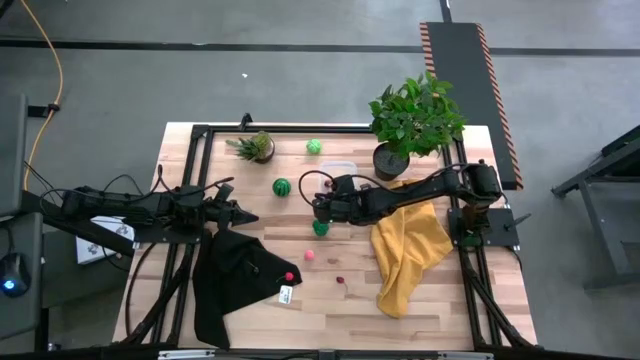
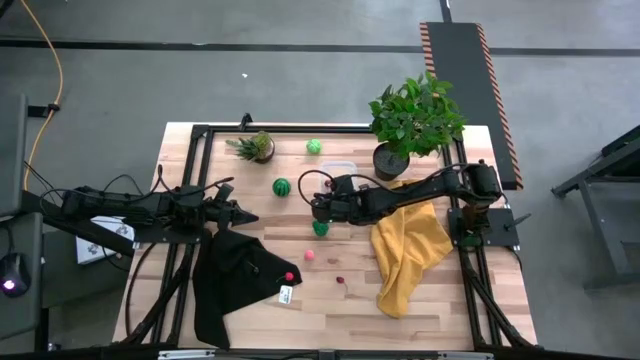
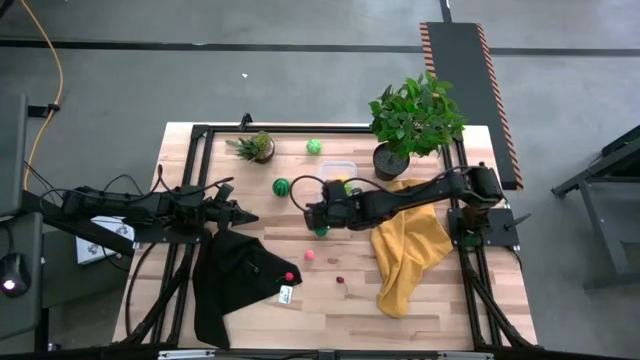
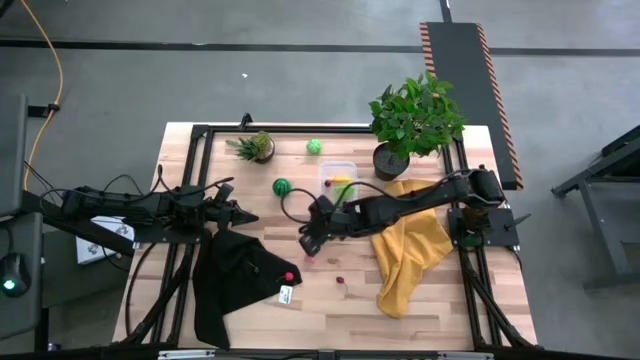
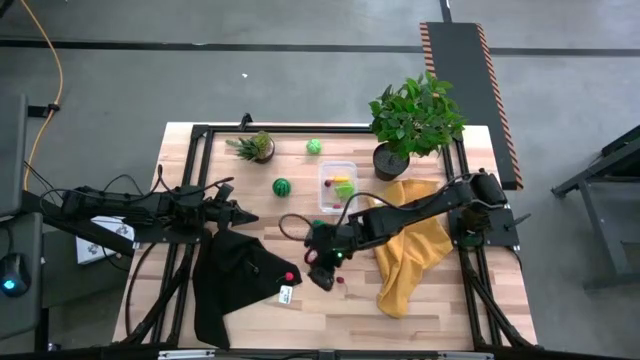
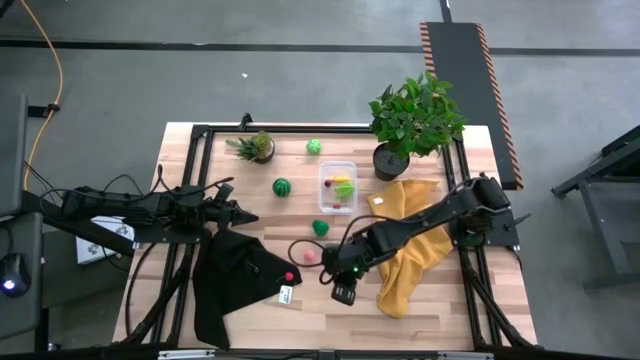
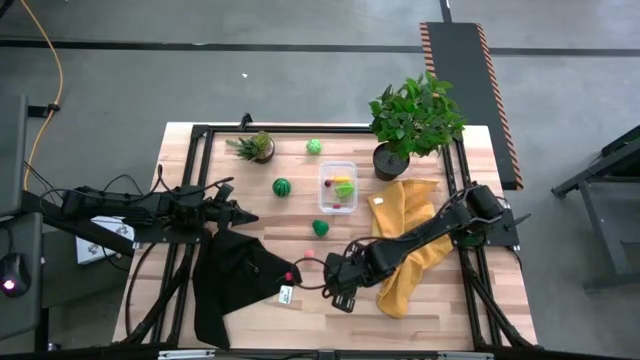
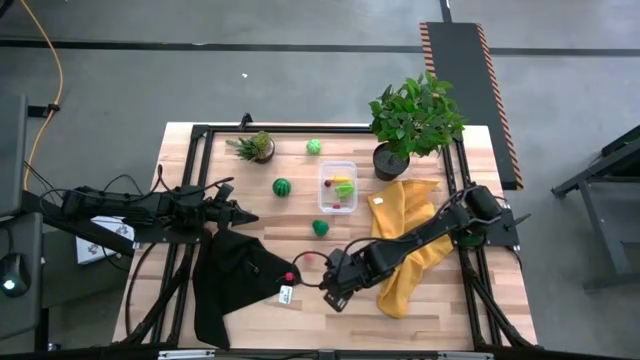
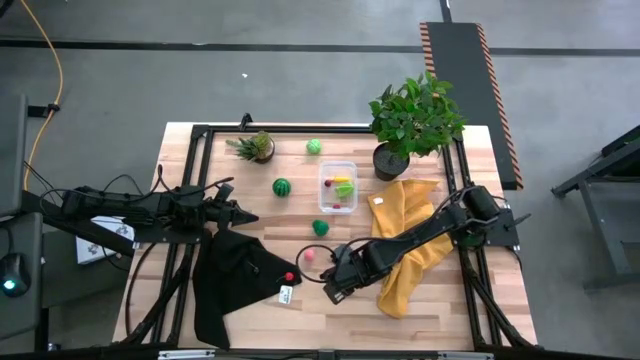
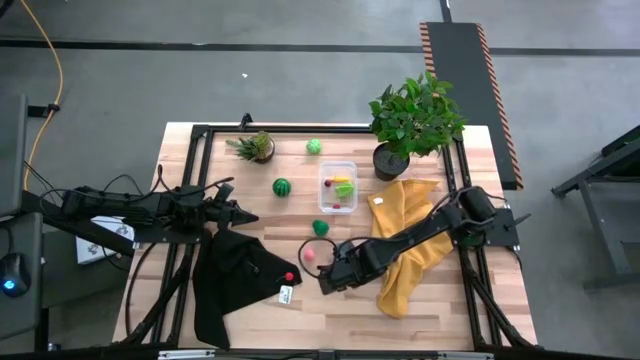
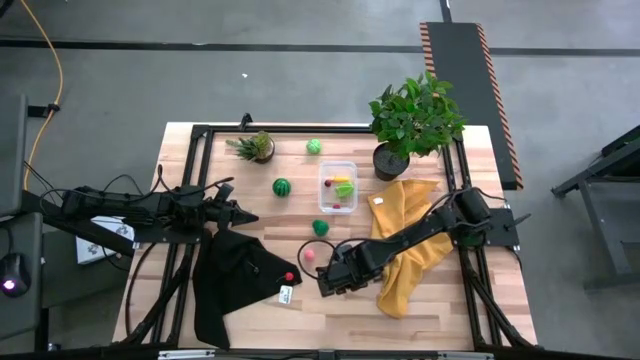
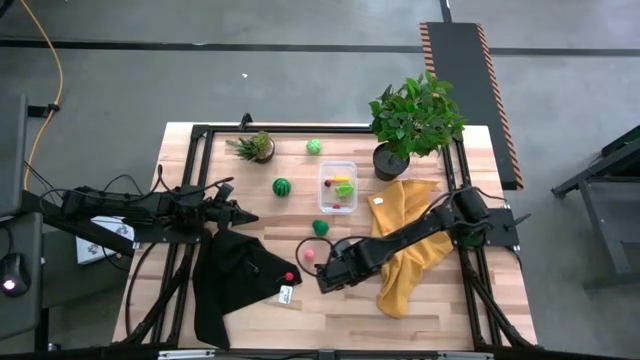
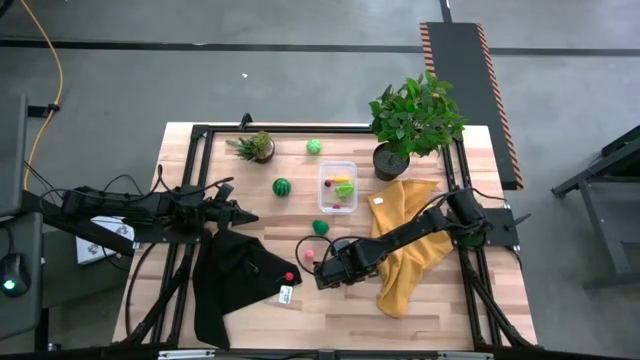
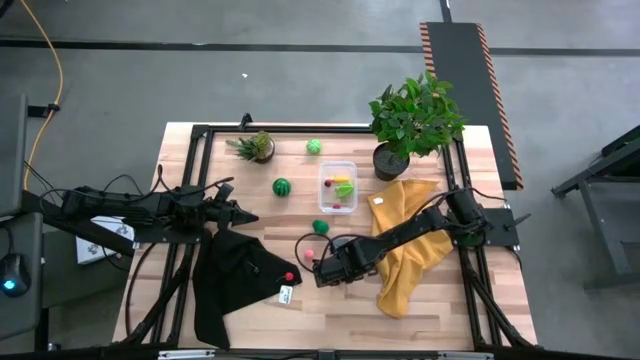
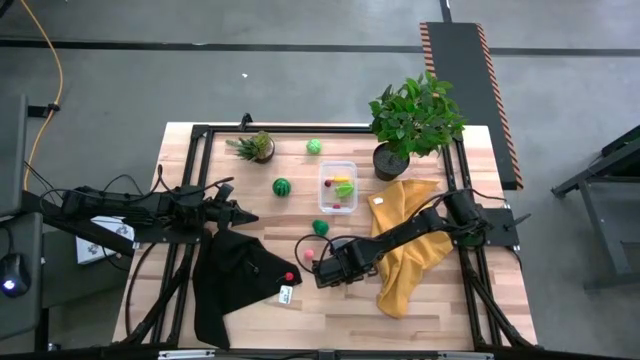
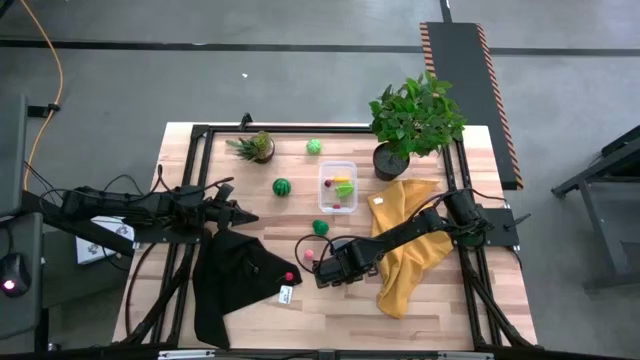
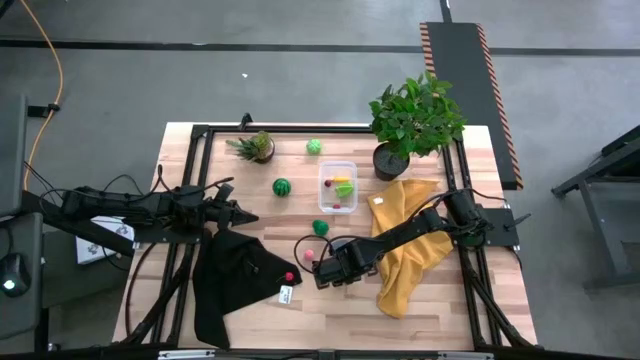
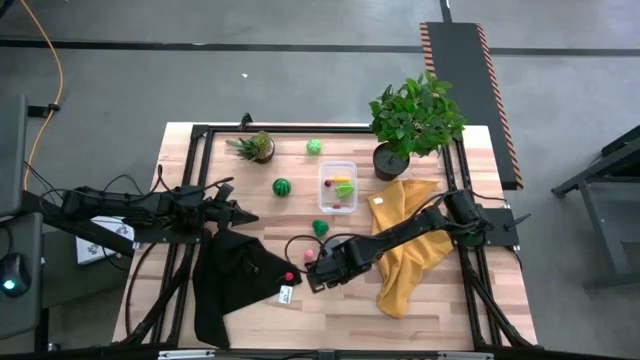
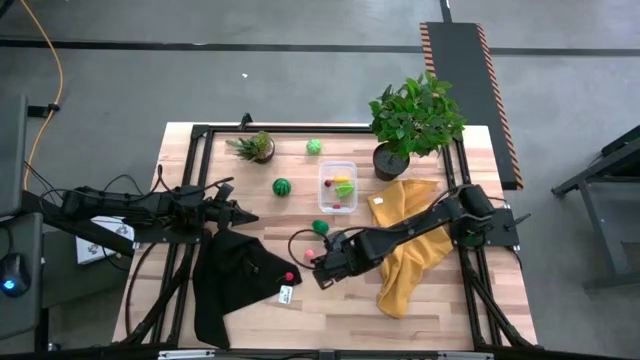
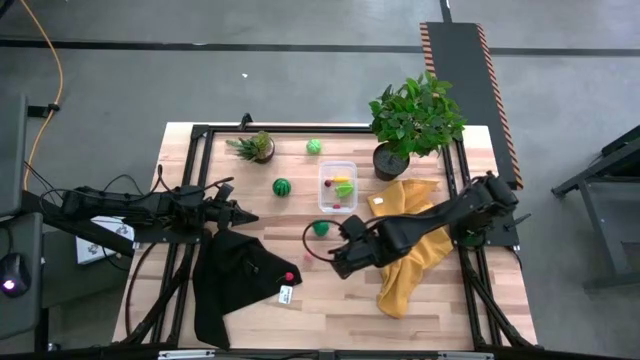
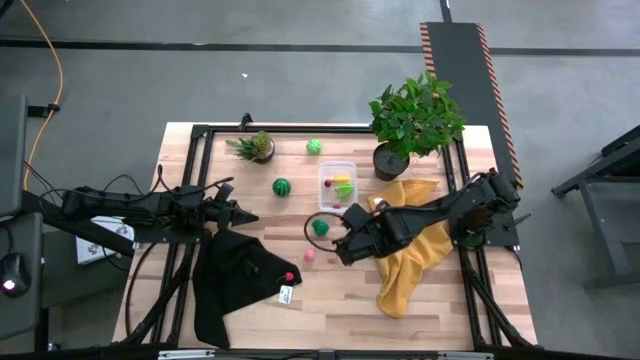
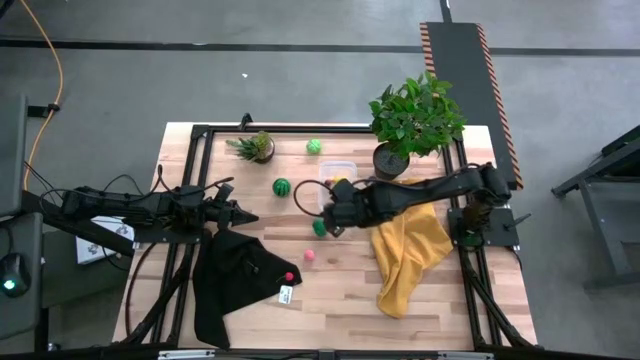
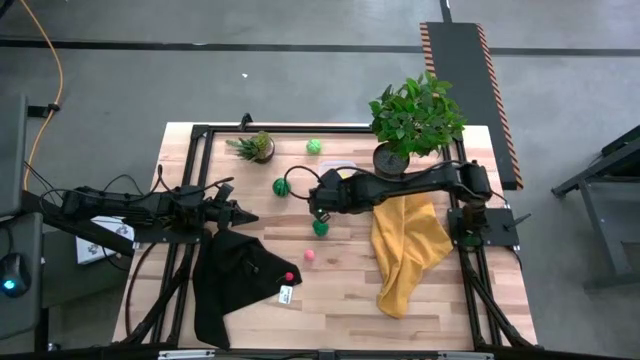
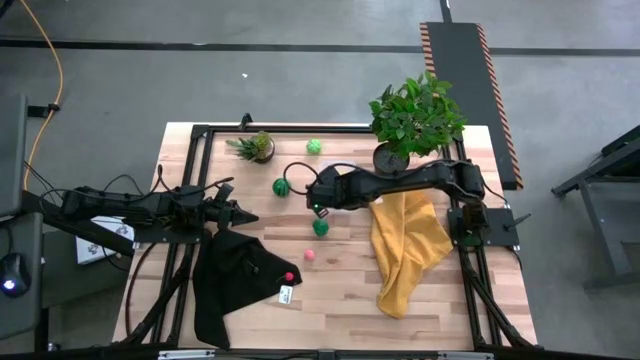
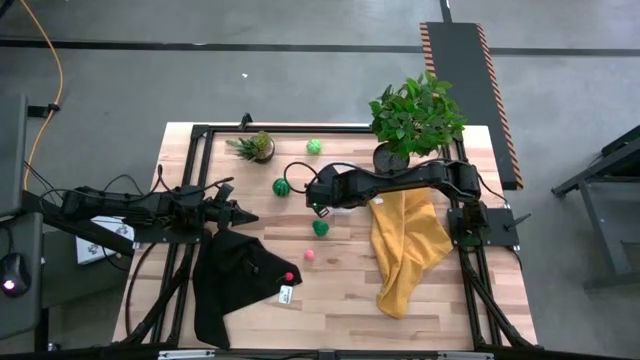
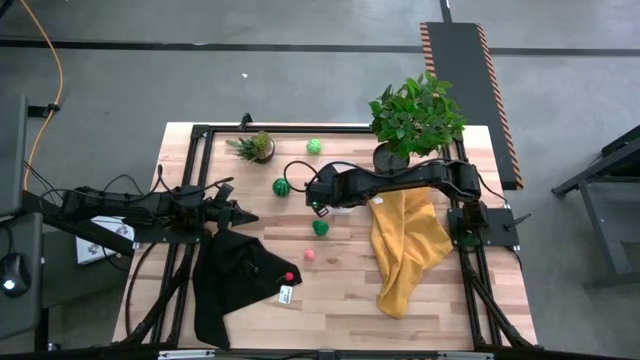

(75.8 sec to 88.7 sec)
Task: Pick and placing Produce into tupperware
Put the right red cherry into the transparent bin

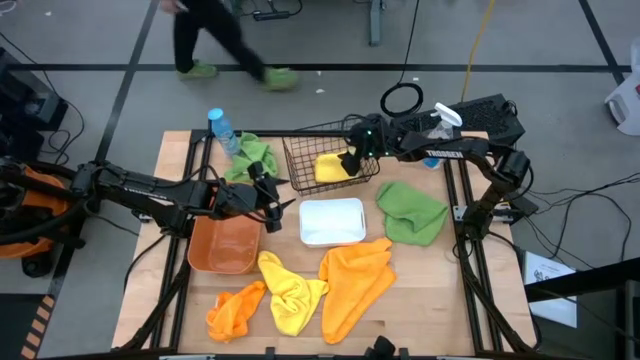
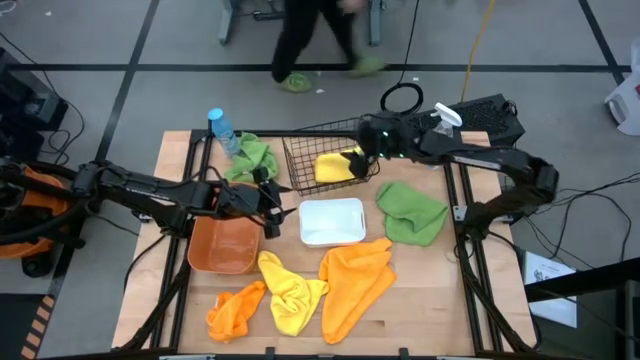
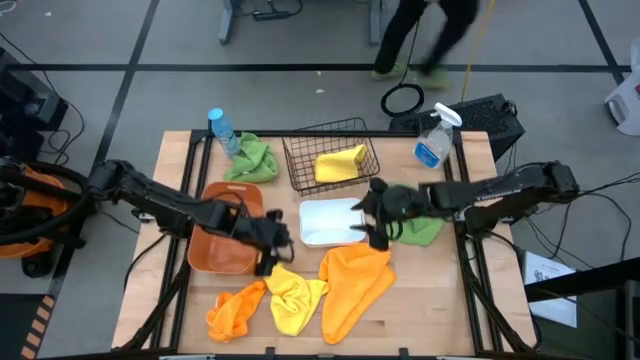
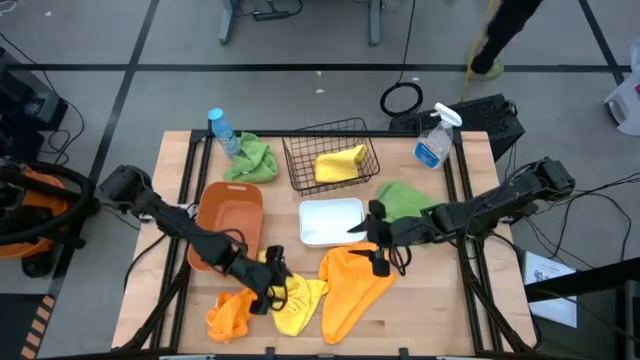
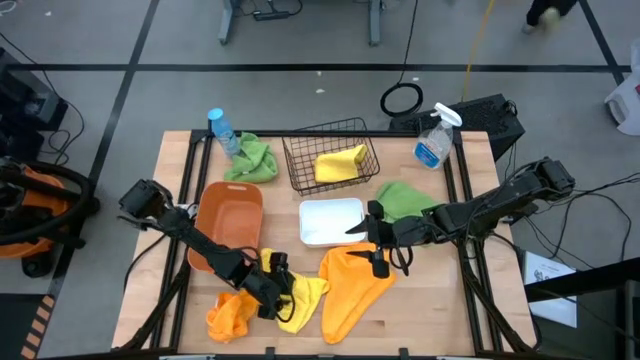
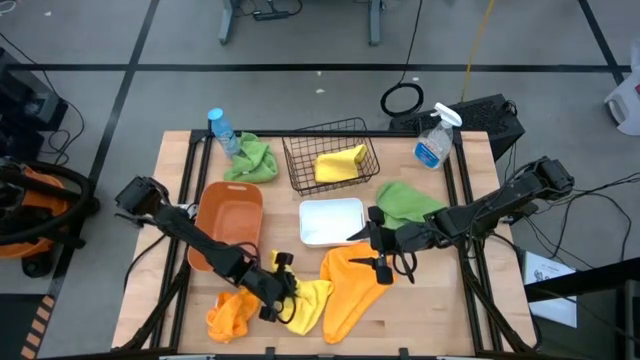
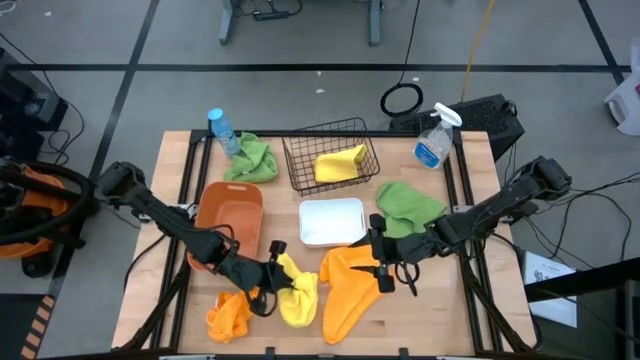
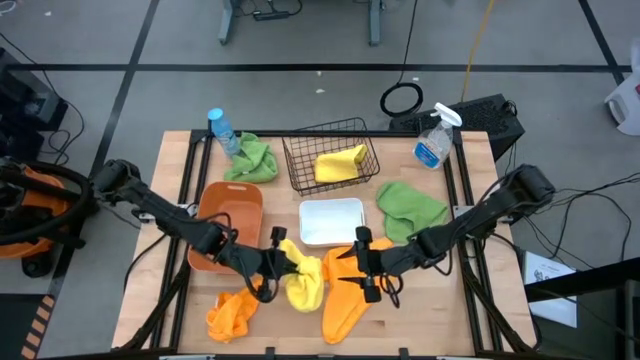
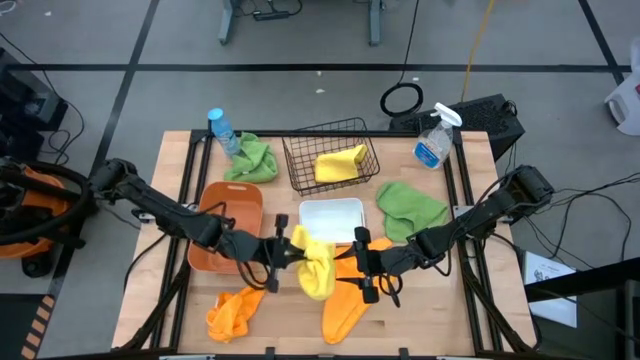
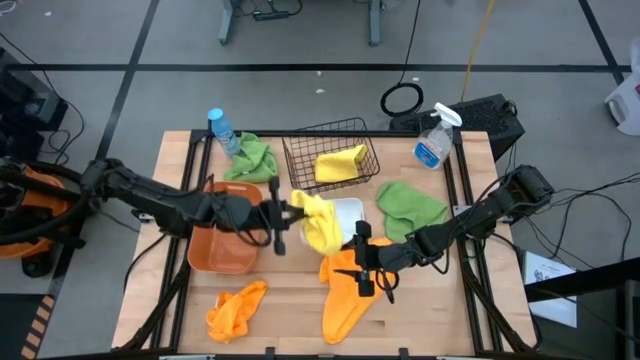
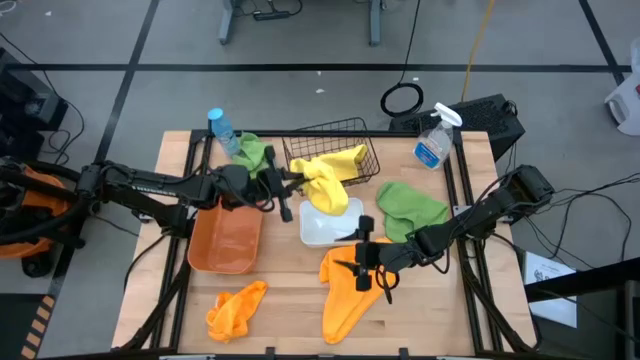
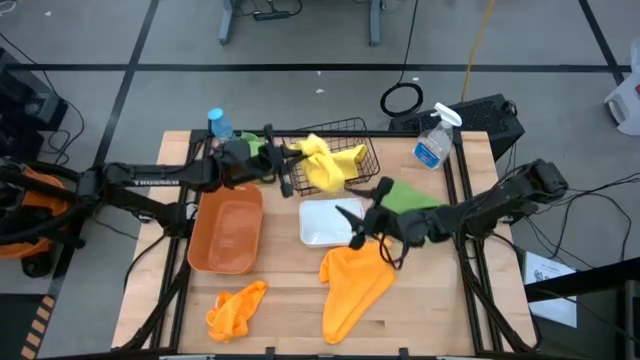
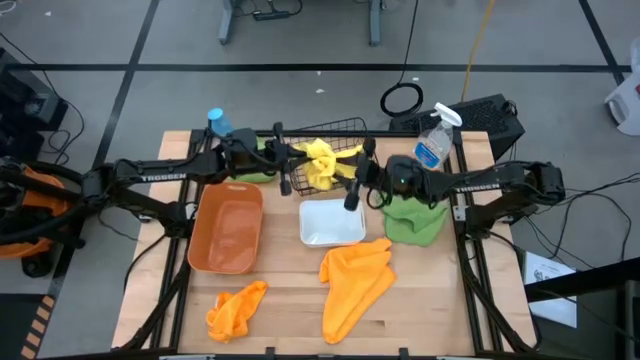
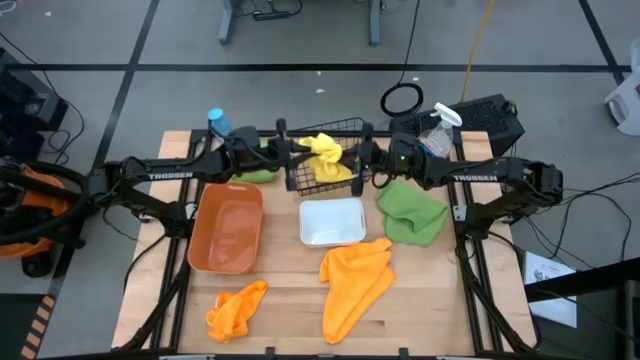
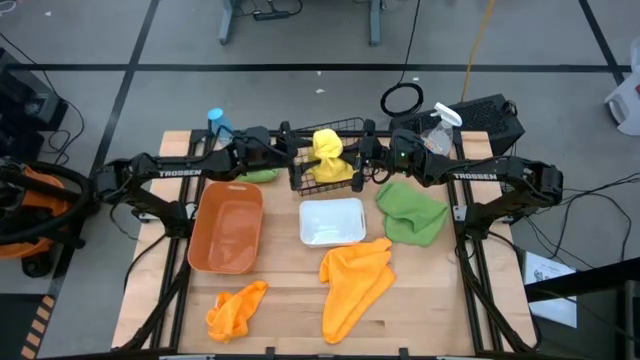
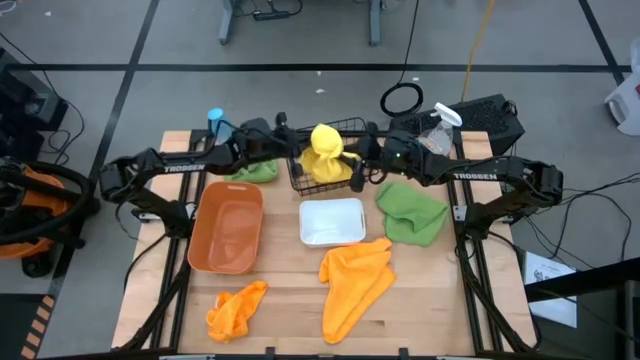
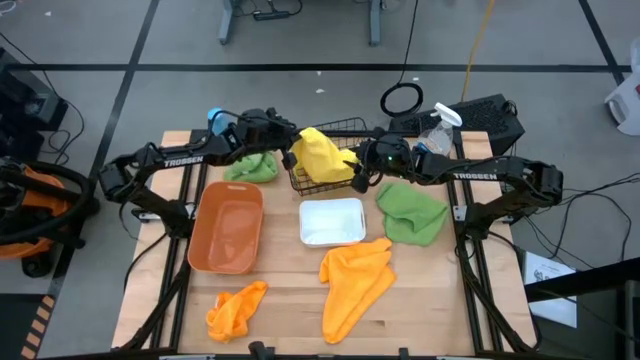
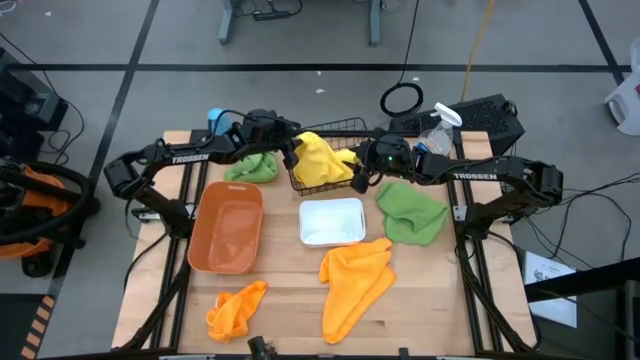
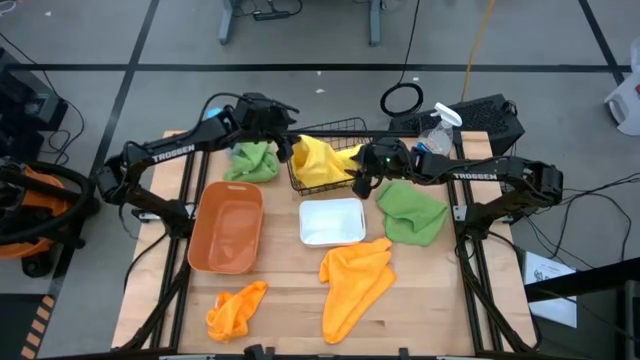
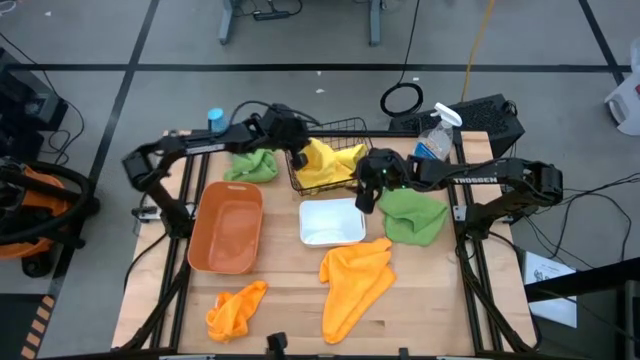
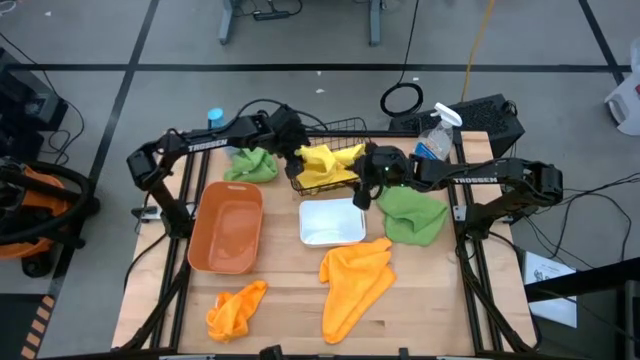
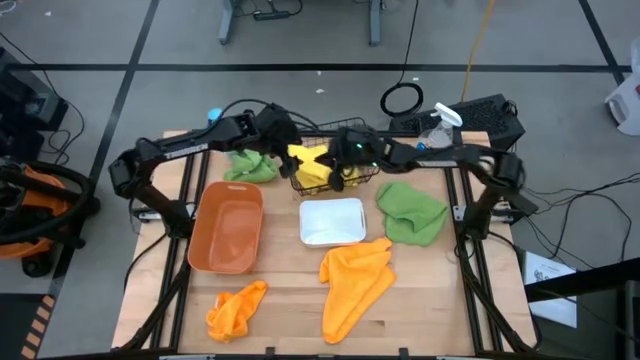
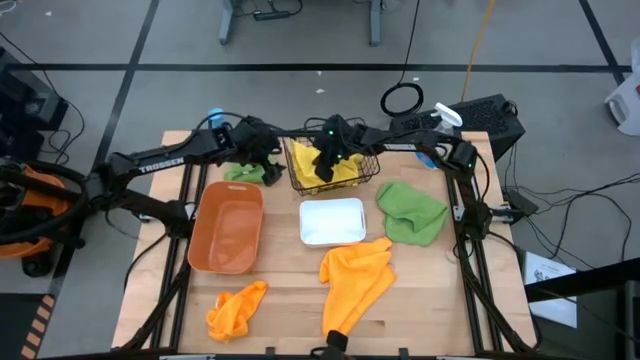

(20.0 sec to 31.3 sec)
Task: Sort microfiber towel by color & place in baskets
Put the yellow towel into the black wire basket
